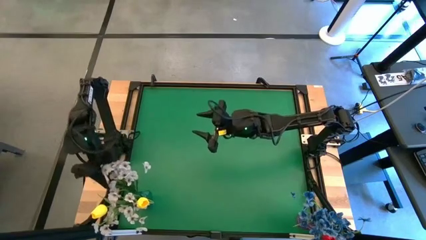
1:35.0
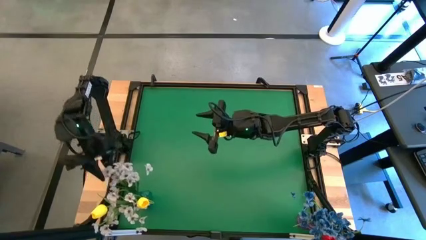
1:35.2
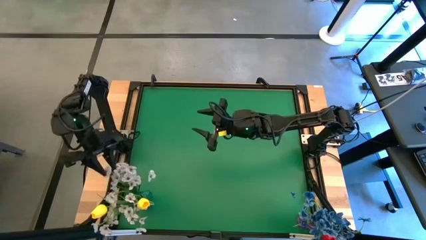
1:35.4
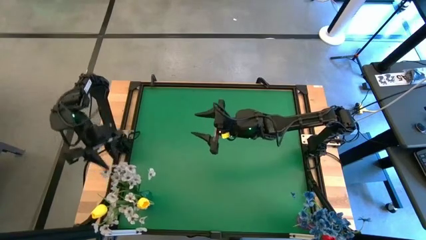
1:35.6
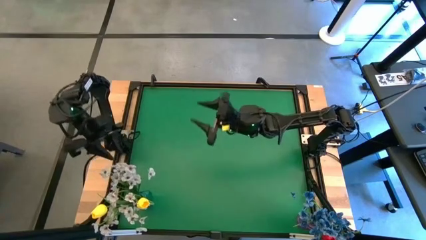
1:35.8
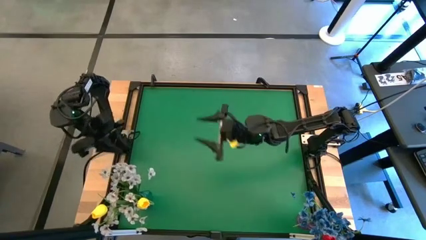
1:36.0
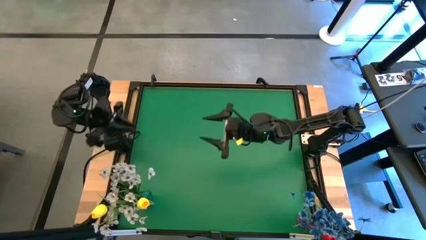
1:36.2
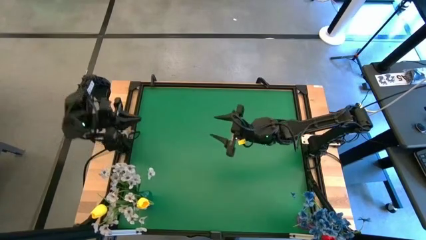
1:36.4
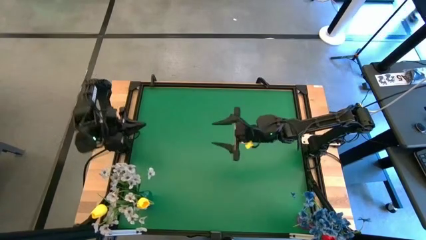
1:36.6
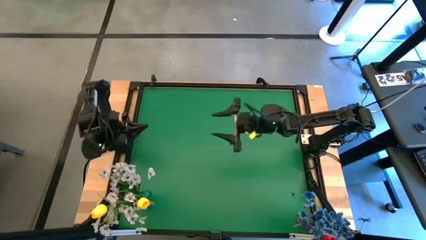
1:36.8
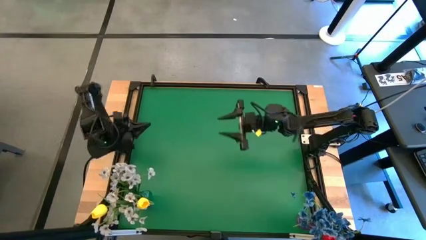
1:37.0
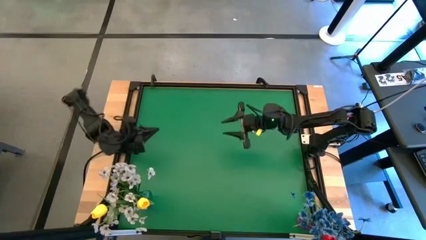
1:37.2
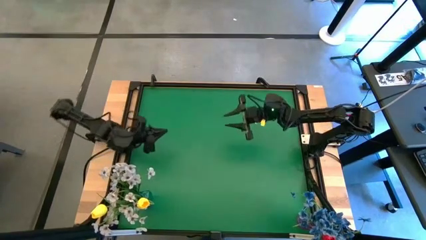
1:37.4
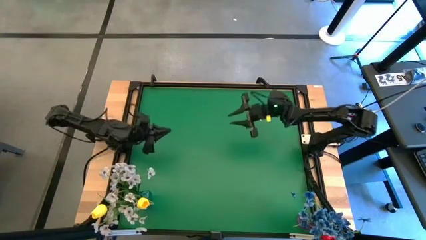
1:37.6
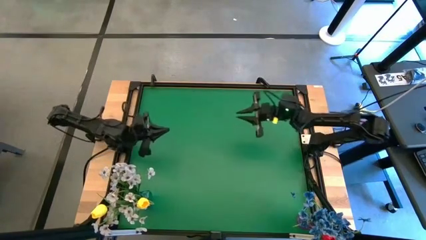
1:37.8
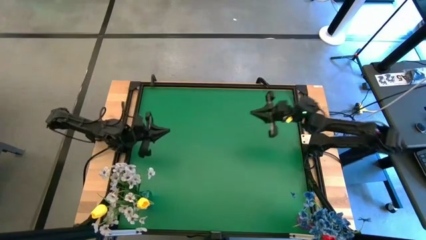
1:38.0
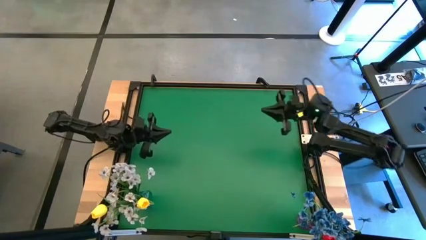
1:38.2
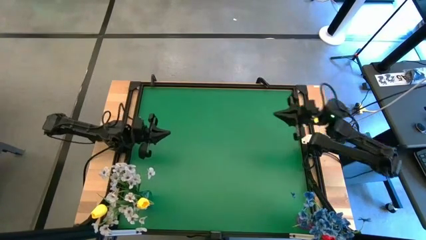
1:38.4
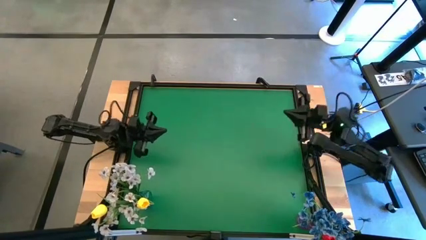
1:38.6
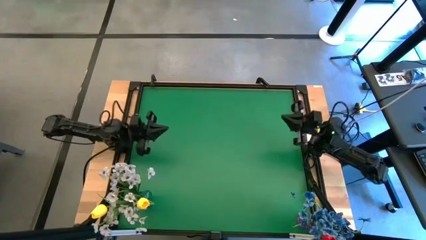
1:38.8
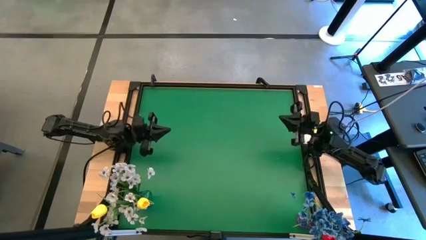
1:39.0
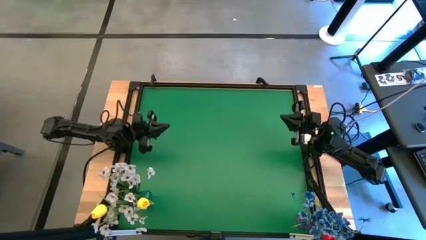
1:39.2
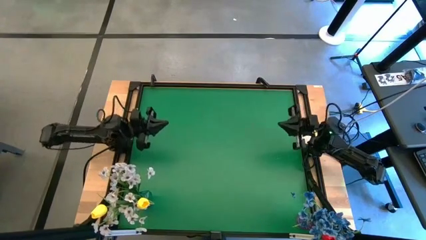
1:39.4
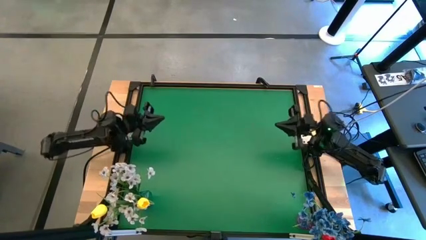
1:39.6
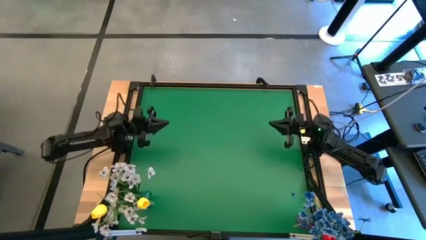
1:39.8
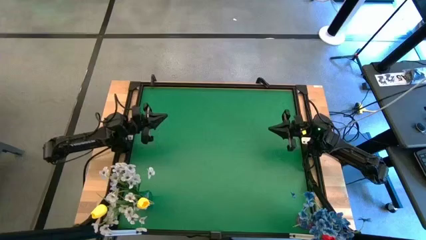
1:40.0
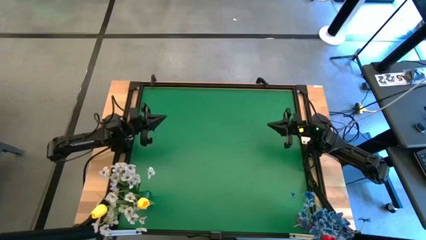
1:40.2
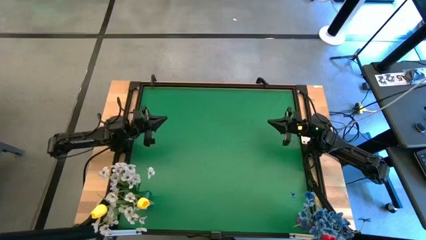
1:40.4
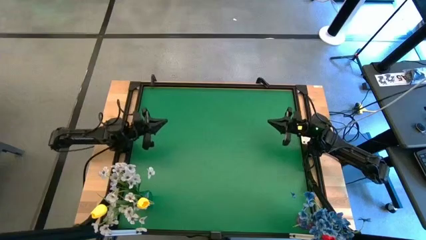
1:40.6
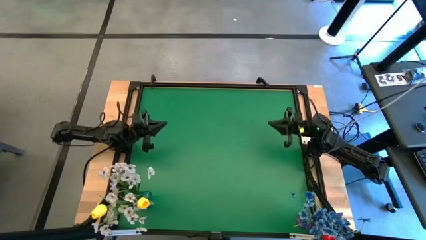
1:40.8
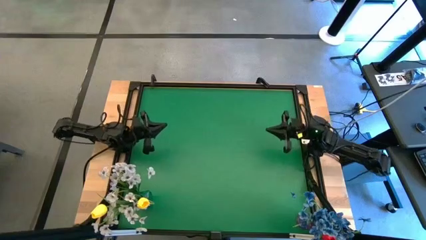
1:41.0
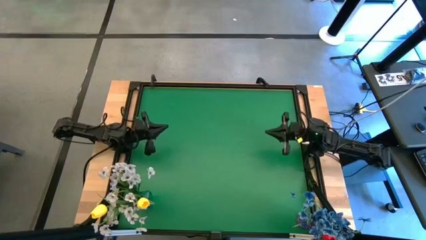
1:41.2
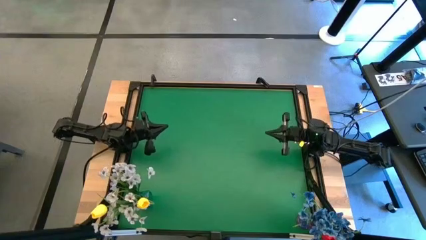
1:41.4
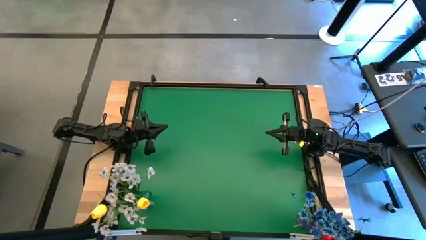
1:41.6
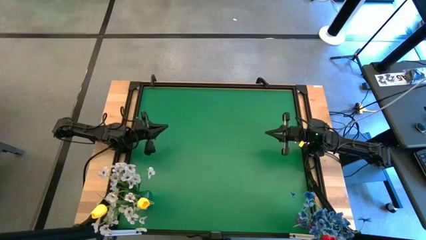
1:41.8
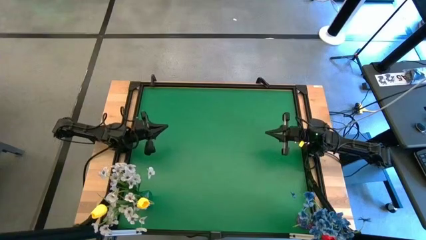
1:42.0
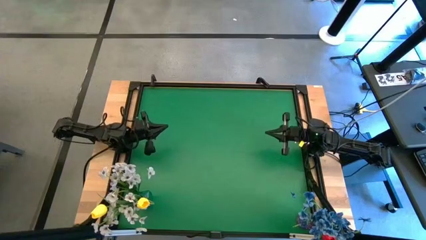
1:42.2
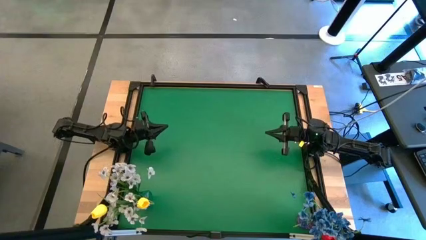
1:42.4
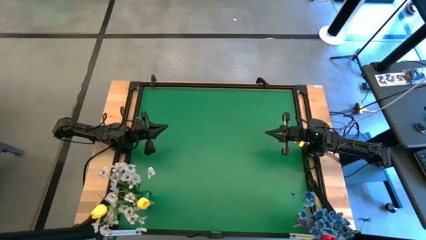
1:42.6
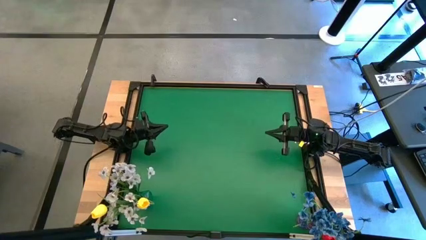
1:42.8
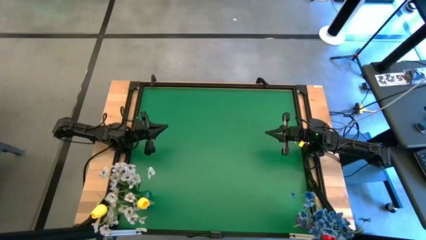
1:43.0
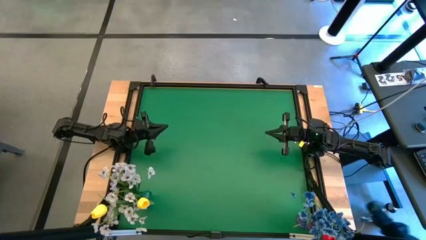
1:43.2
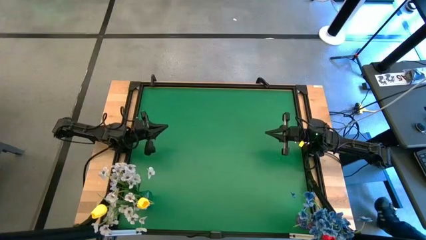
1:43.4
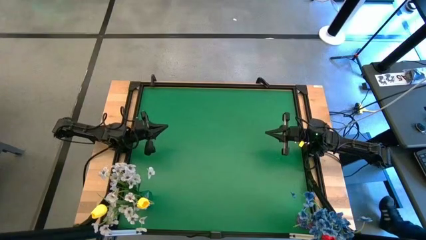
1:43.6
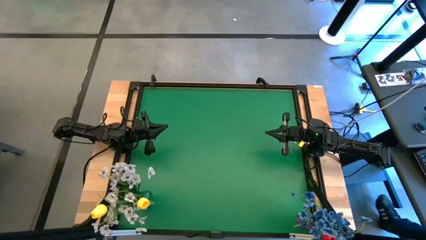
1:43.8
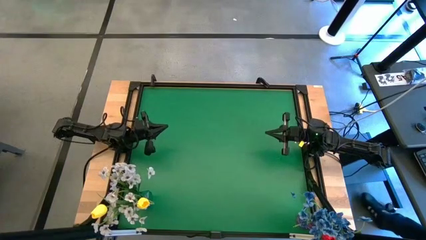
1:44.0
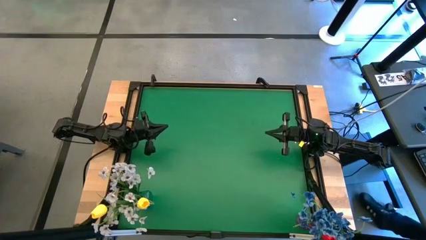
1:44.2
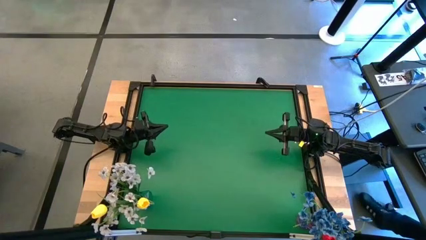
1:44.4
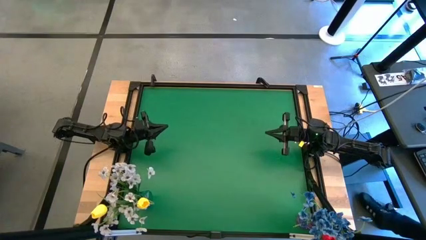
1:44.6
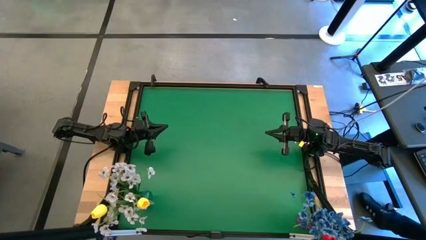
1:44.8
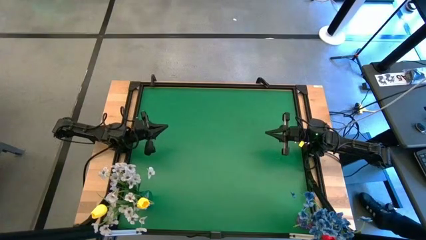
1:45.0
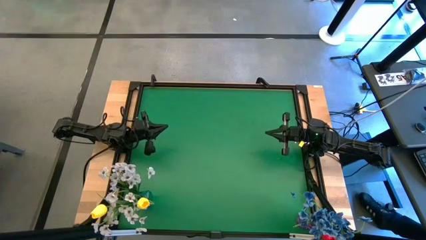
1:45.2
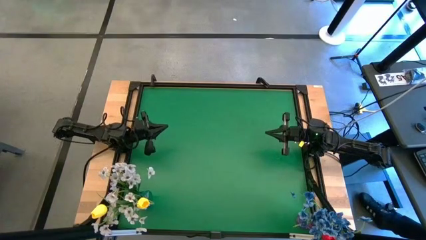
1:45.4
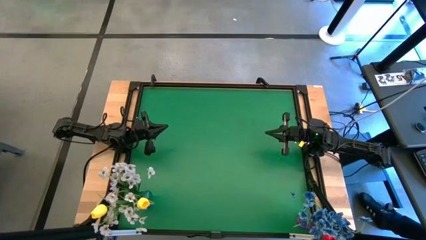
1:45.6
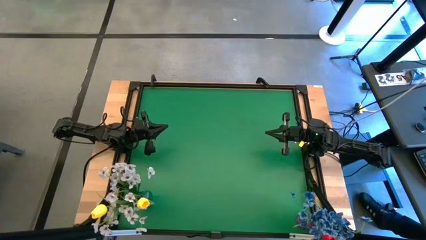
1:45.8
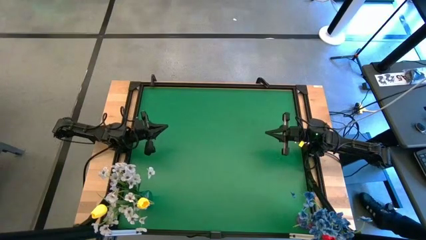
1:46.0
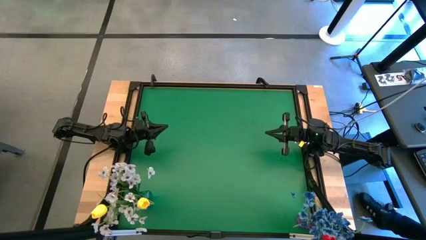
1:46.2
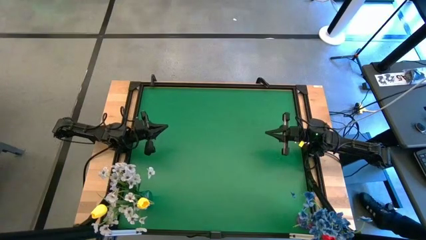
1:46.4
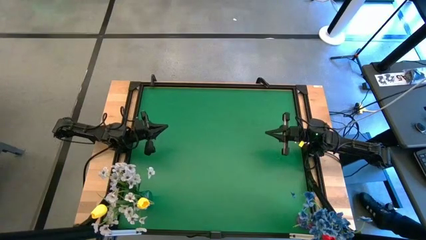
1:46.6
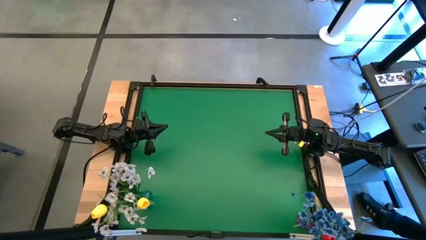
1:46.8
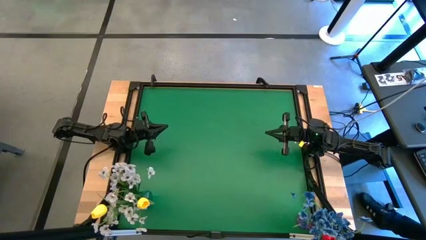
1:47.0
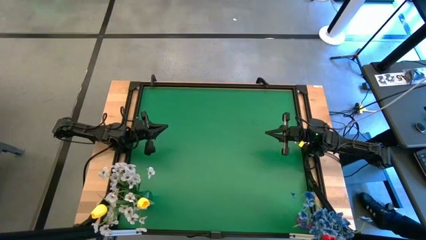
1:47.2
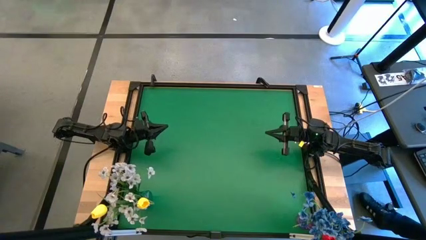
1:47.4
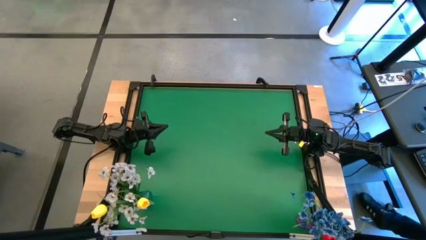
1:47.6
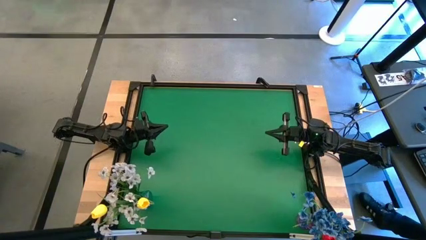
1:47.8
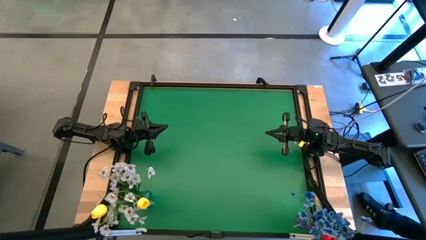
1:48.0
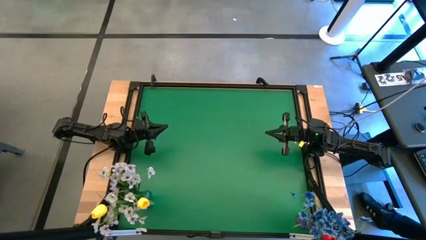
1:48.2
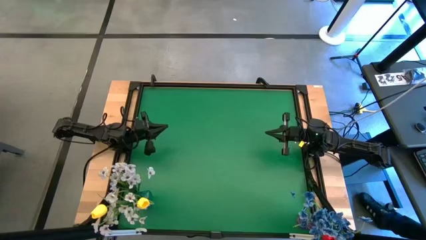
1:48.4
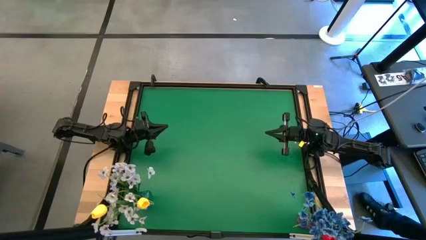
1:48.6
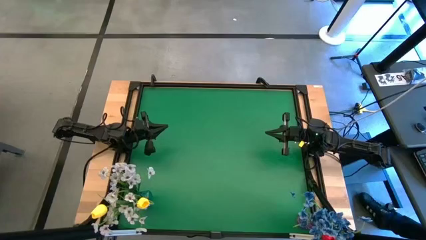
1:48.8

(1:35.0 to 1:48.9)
Task: Sort flowers into vase by color
Return to Home Position
